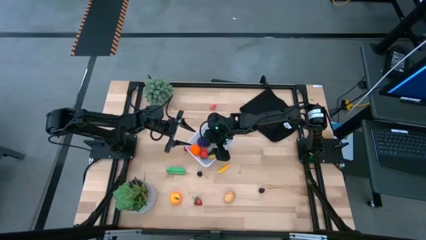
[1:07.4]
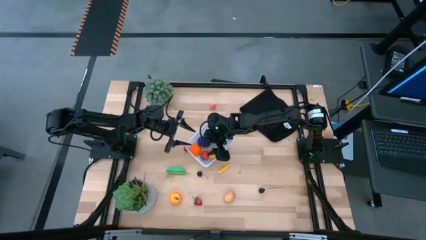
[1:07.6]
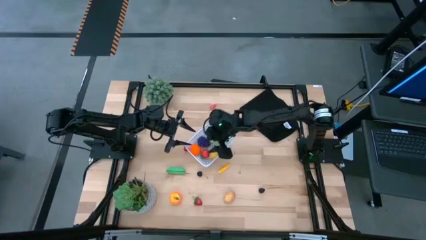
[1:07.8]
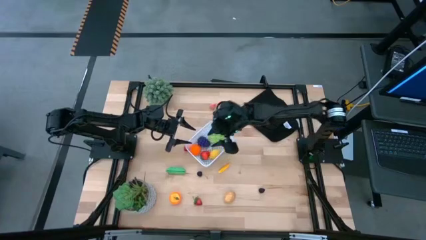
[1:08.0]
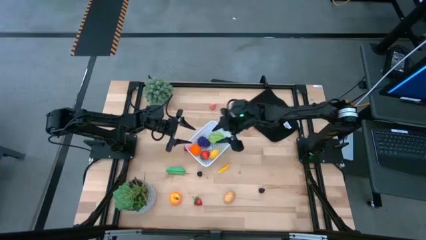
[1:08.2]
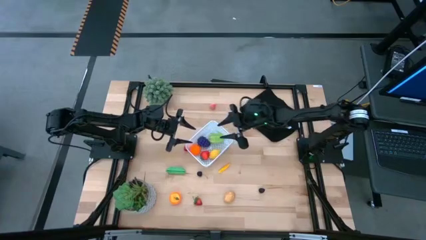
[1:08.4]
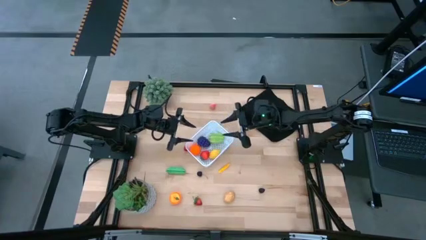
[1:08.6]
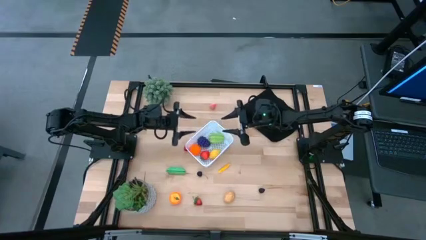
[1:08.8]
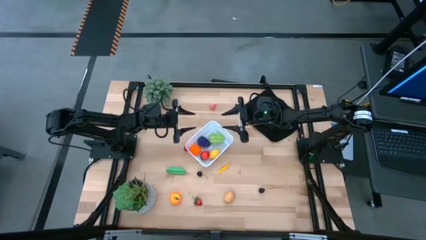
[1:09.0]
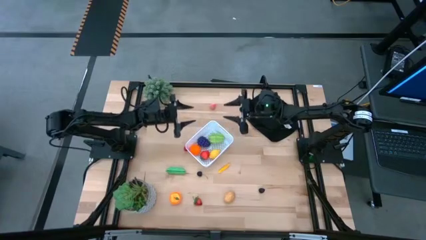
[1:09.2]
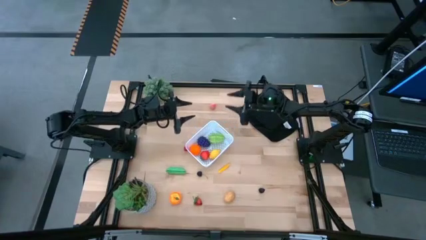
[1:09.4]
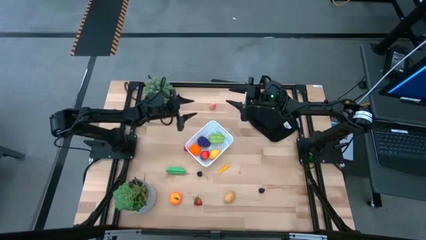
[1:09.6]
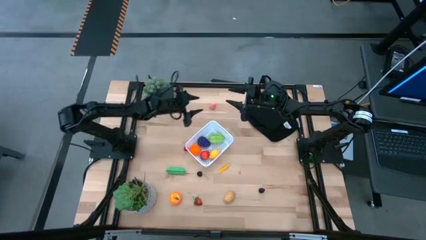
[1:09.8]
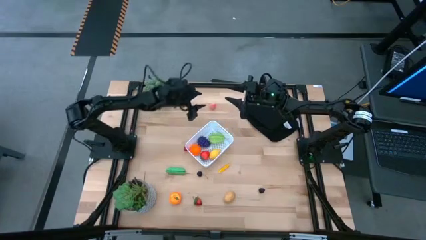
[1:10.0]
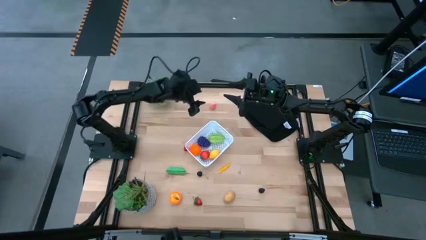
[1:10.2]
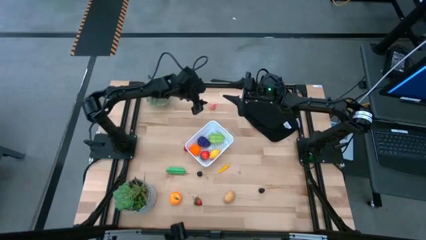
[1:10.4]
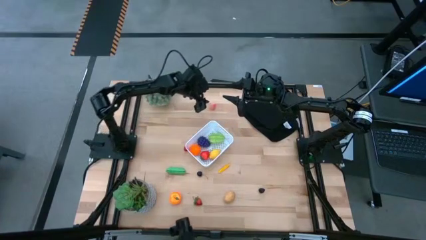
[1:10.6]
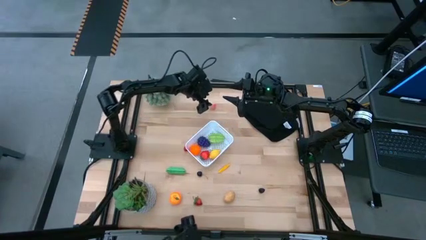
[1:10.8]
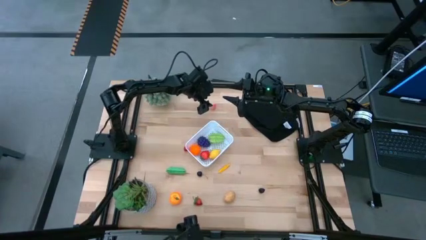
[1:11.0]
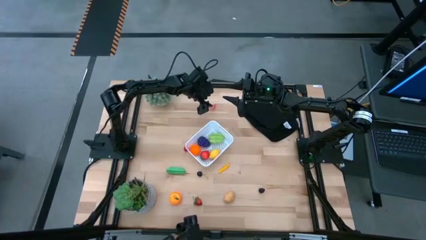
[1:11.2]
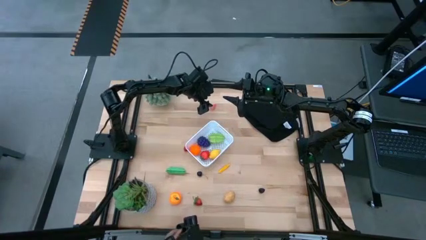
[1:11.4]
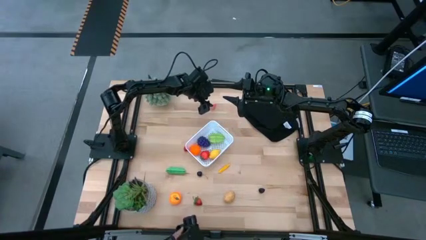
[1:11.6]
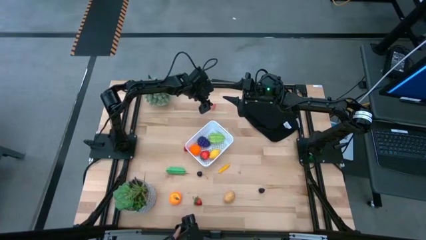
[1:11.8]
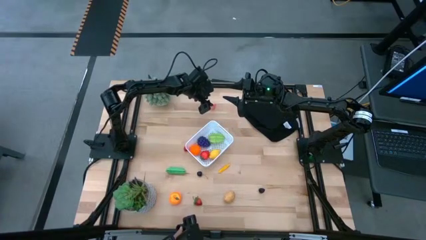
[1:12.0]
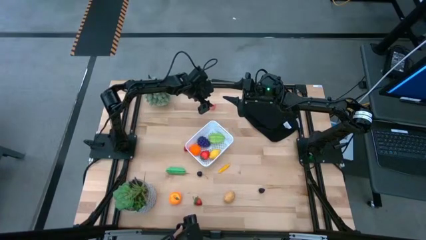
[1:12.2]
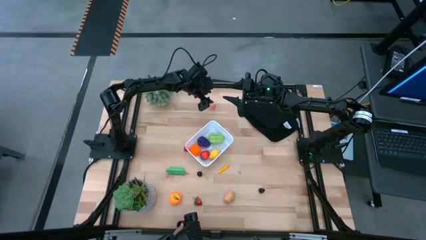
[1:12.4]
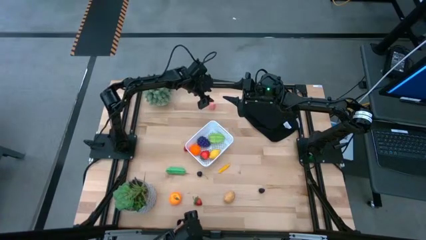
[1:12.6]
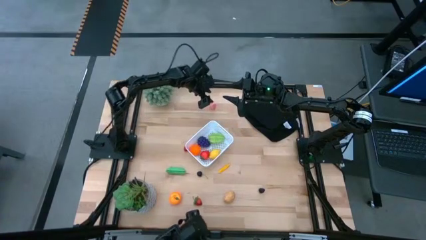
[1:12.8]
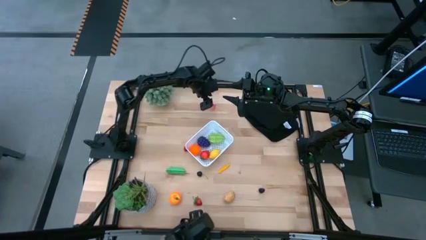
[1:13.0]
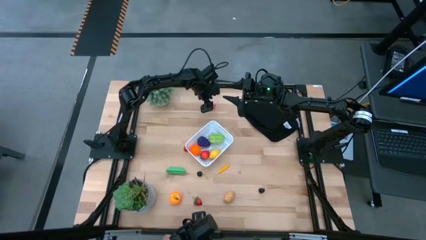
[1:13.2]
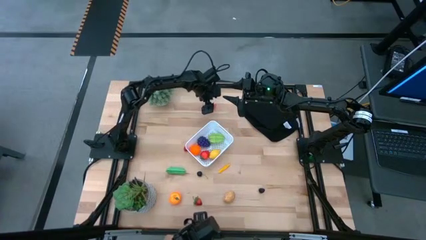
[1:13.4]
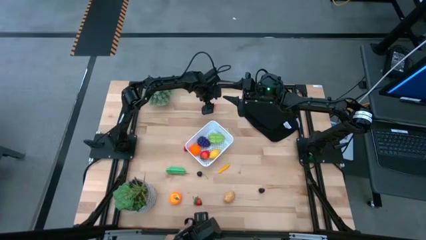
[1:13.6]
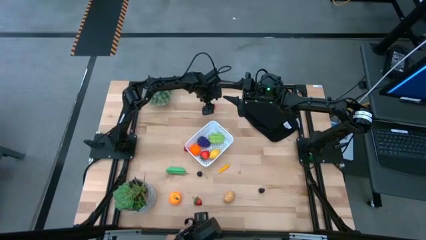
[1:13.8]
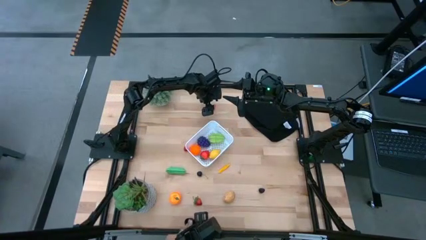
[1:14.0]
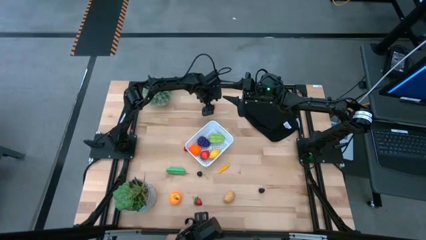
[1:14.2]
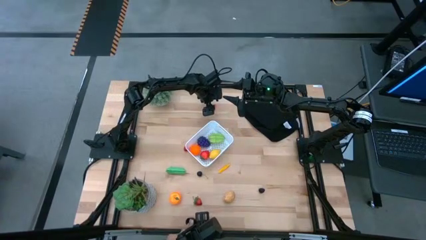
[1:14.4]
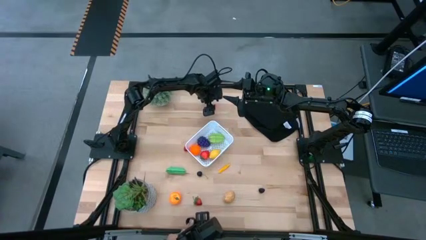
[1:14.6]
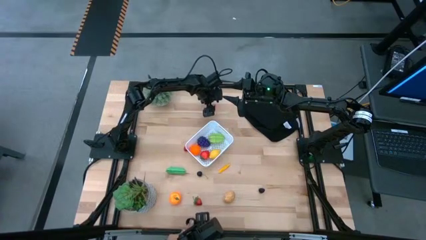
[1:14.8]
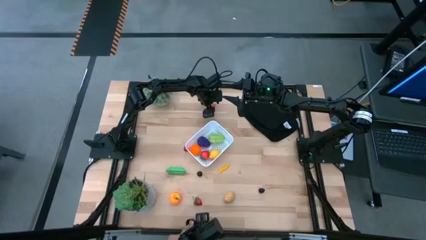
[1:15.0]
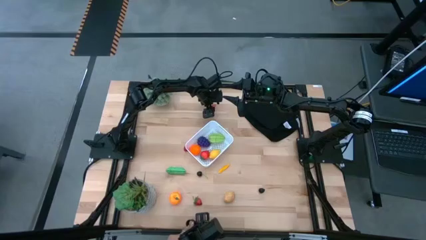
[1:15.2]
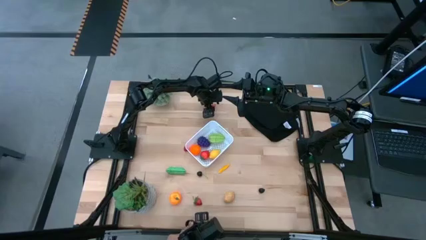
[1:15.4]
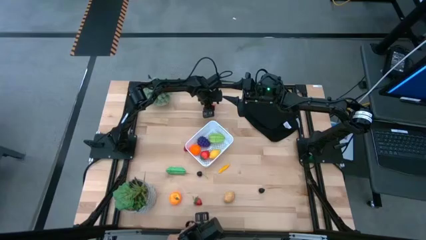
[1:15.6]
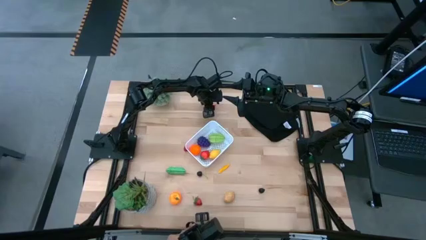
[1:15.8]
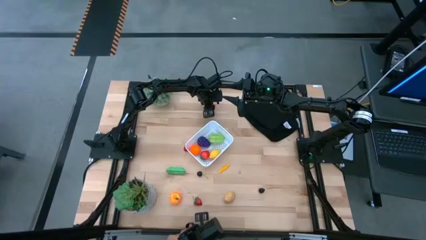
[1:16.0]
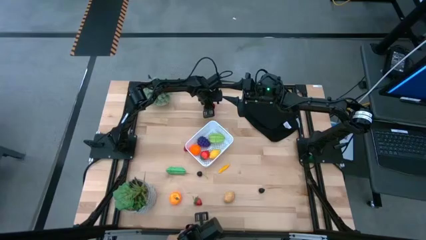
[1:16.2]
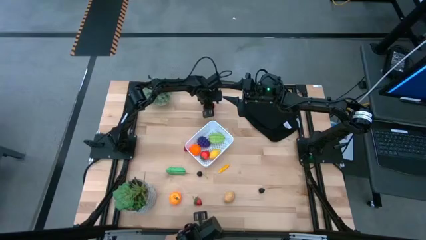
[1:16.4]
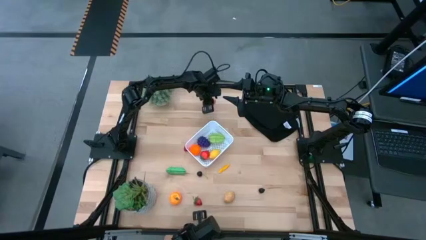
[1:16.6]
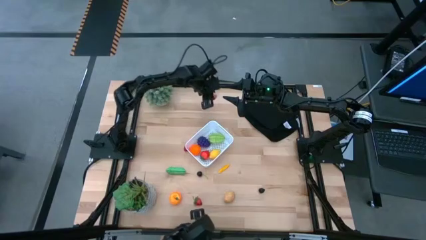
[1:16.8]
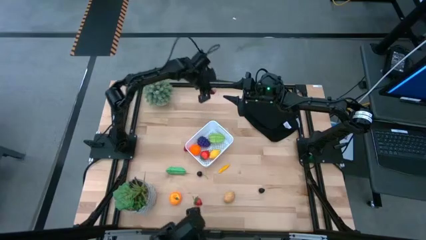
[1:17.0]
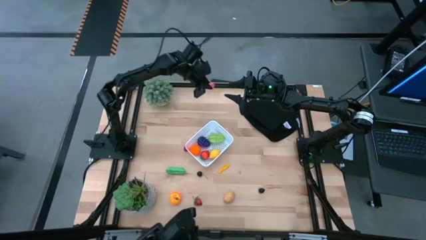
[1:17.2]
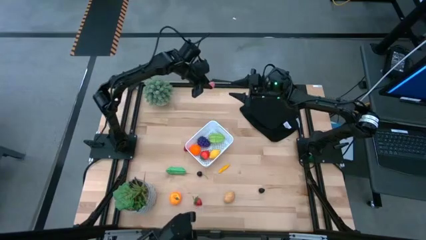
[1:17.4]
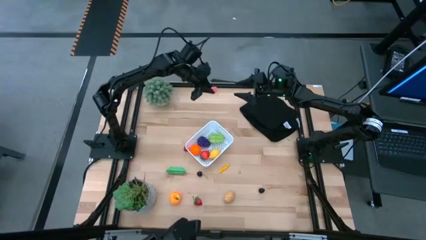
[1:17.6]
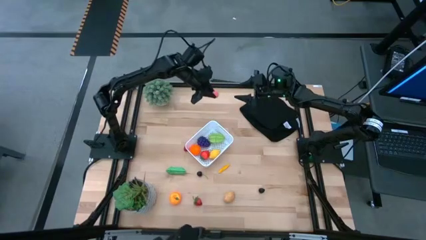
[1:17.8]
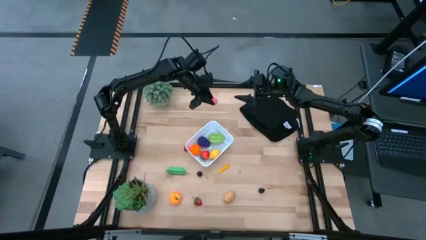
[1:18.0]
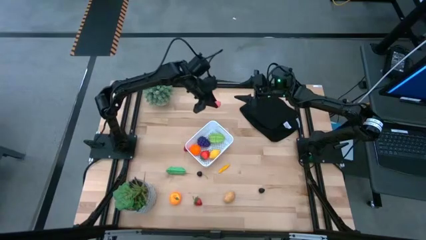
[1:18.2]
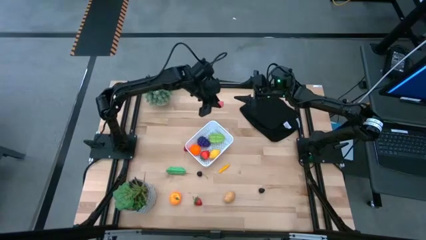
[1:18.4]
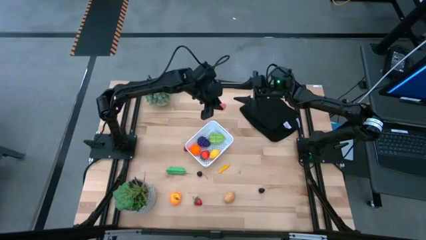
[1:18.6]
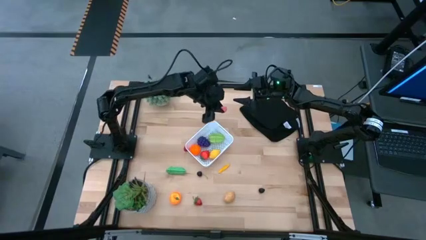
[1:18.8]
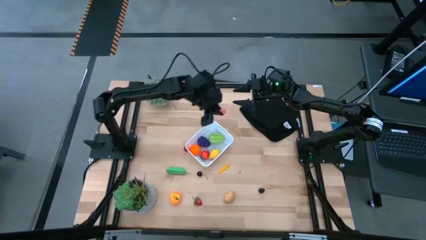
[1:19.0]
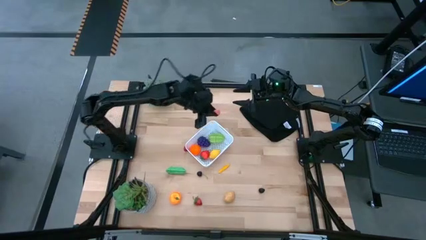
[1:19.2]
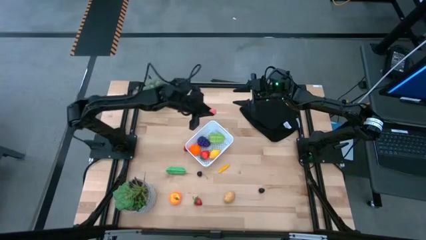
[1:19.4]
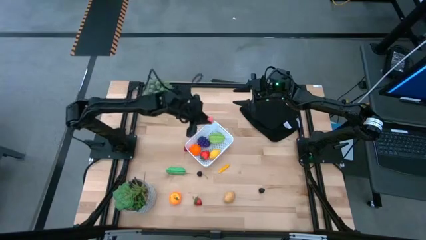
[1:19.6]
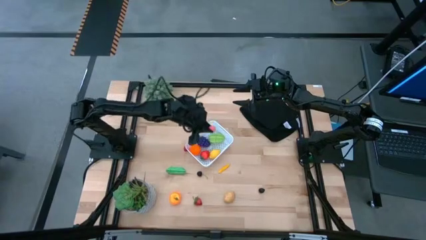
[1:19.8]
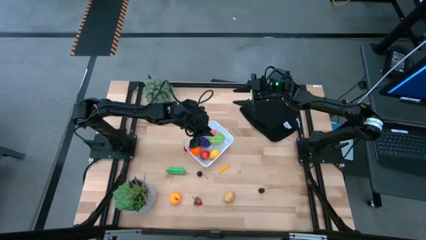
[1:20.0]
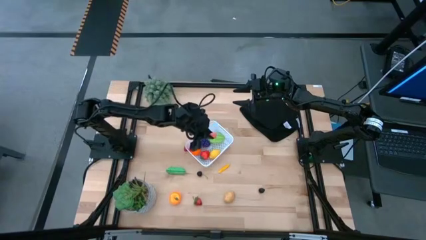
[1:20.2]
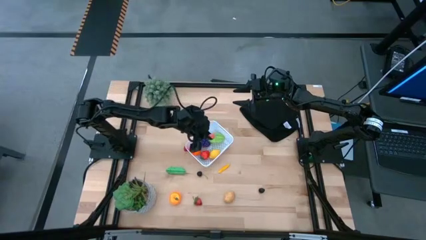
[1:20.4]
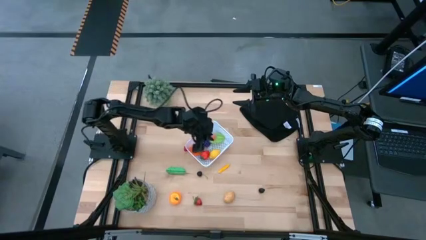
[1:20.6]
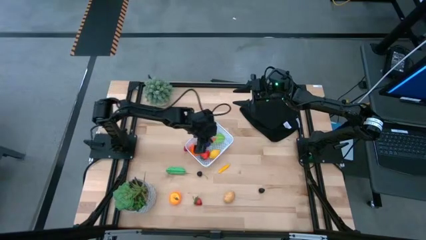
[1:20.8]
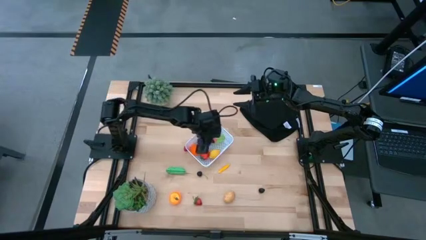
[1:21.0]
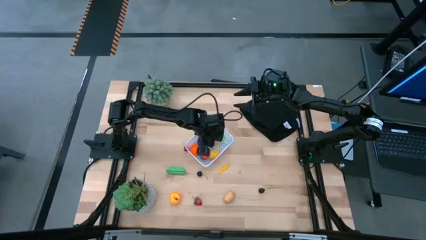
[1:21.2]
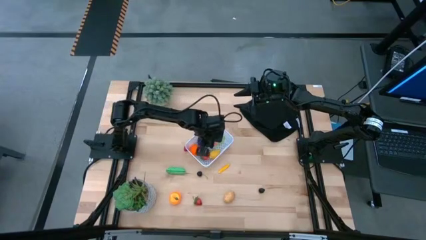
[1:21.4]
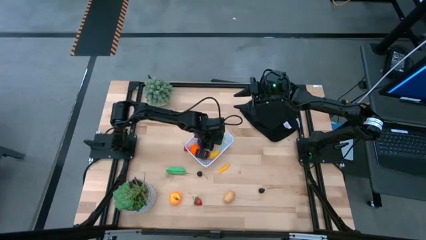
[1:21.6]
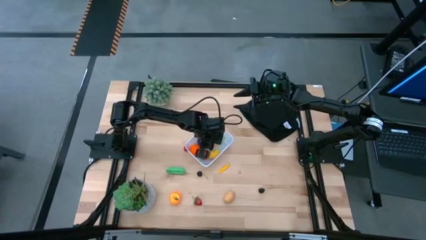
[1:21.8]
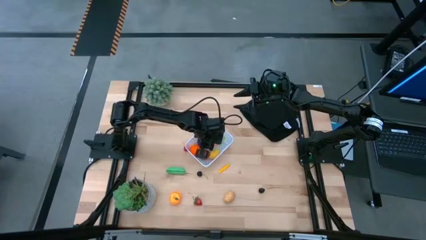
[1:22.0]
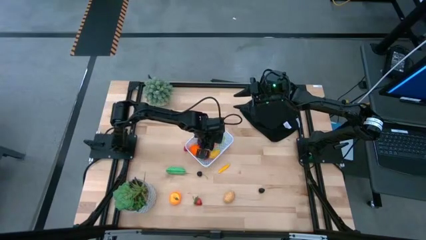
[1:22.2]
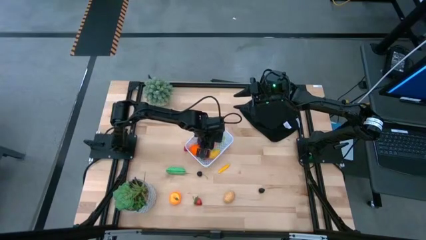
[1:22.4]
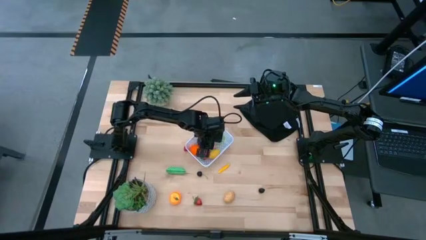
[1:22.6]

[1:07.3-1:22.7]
Task: Pick and placing Produce into tupperware
Put the peach into the white bin

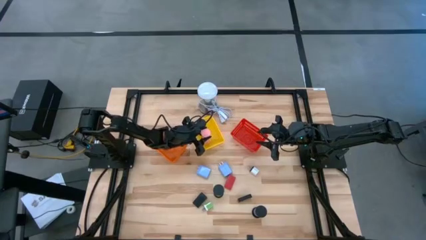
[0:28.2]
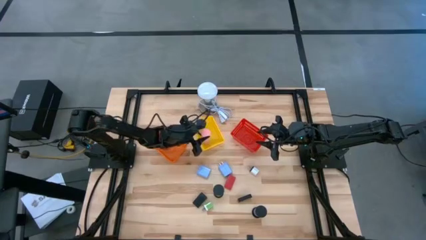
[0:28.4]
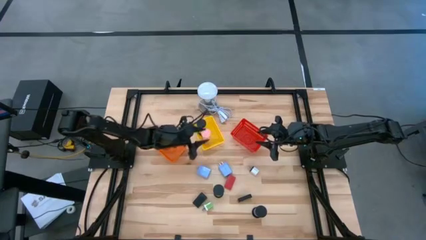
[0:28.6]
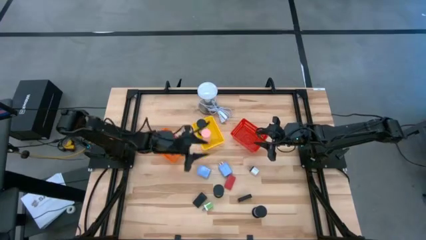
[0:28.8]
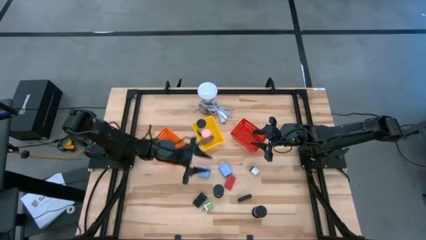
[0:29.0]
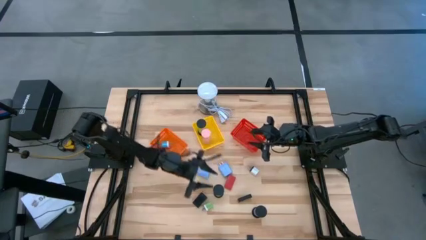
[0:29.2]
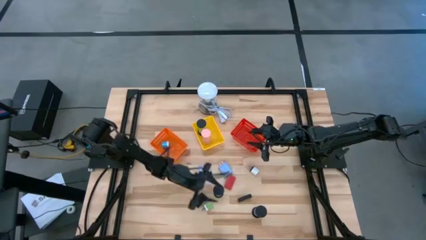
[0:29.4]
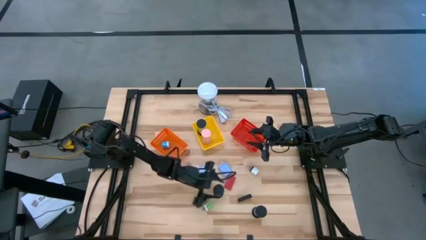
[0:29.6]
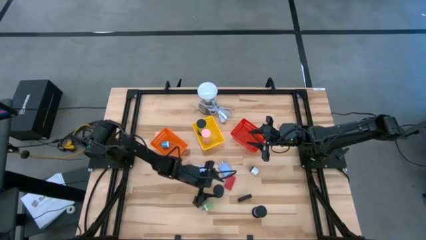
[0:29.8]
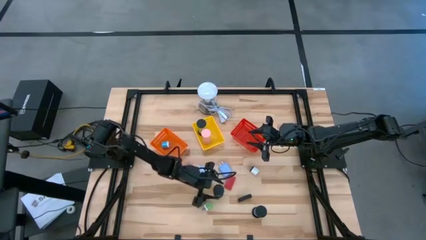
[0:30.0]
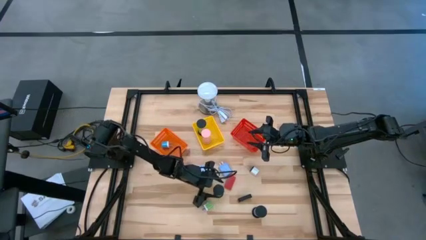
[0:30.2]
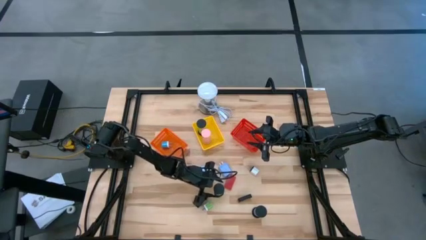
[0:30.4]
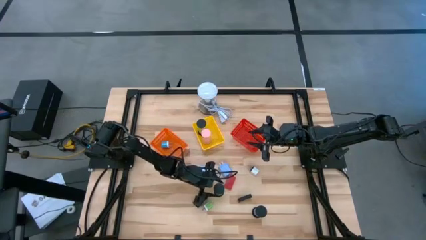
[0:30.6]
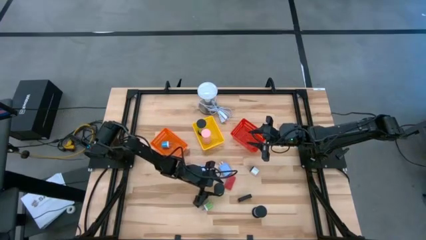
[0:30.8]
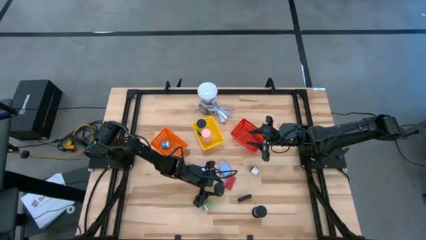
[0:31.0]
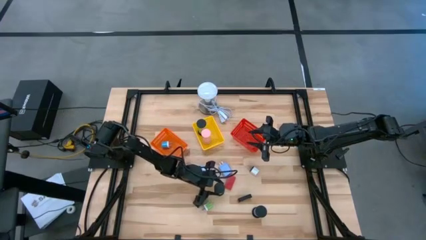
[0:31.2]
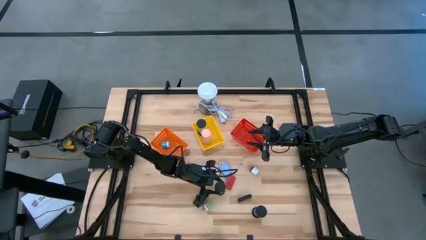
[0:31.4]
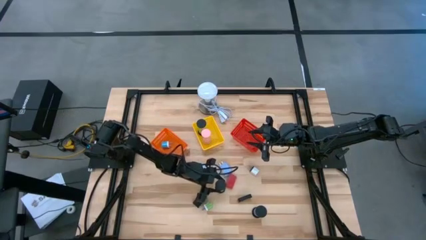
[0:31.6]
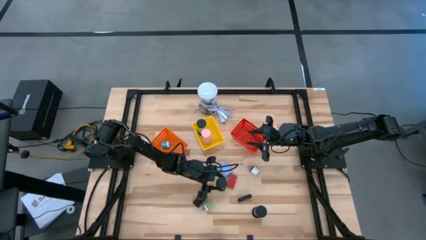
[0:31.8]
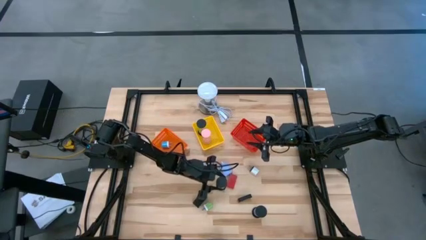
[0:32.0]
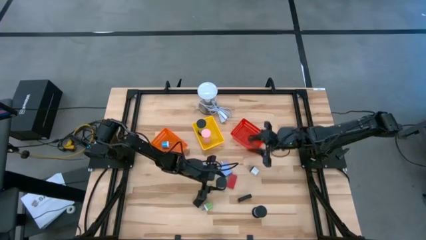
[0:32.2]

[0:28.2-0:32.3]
Task: Pick & Place Office items
Adjust the green hourglass
